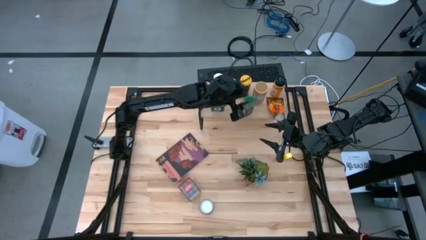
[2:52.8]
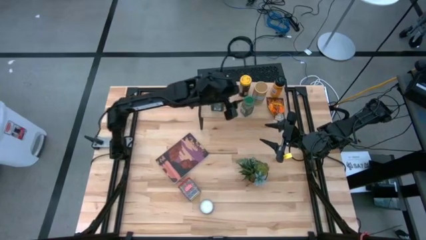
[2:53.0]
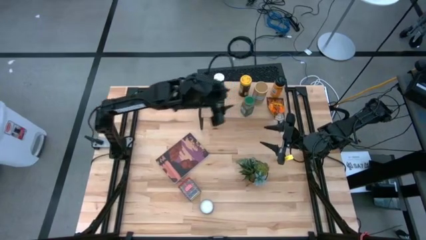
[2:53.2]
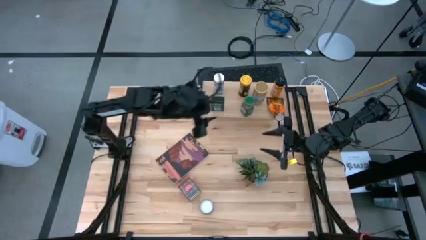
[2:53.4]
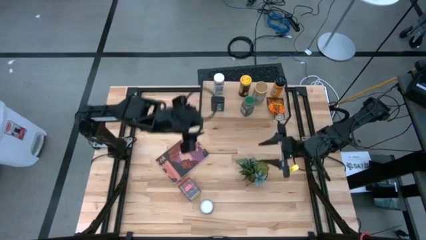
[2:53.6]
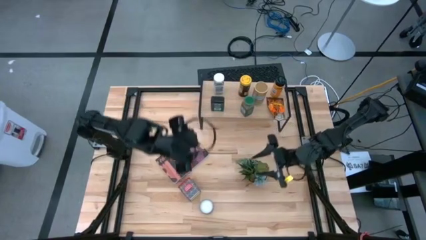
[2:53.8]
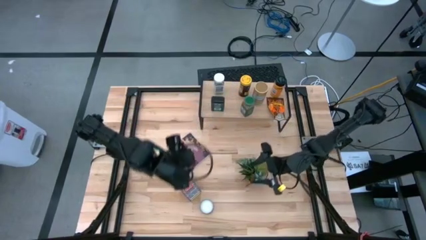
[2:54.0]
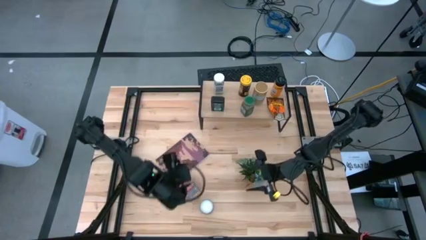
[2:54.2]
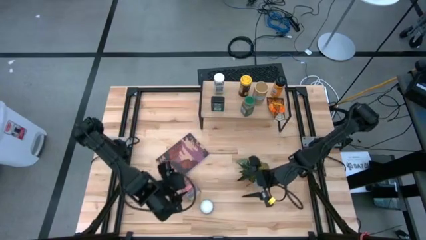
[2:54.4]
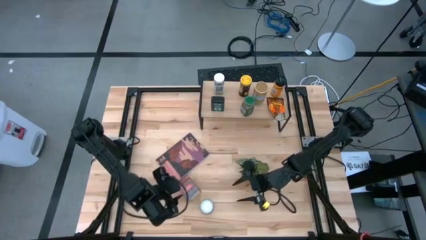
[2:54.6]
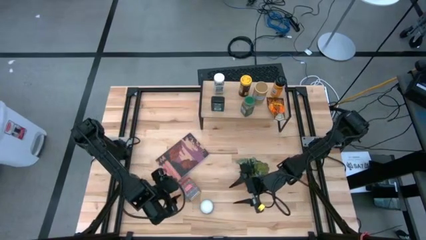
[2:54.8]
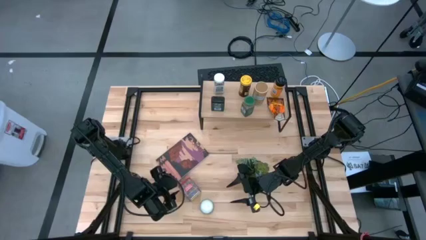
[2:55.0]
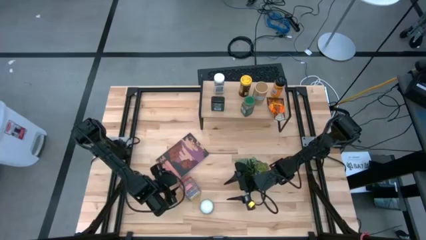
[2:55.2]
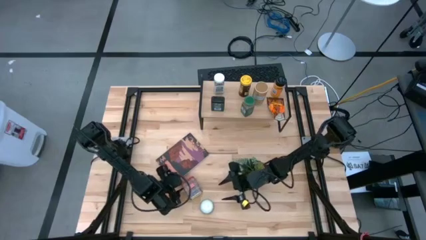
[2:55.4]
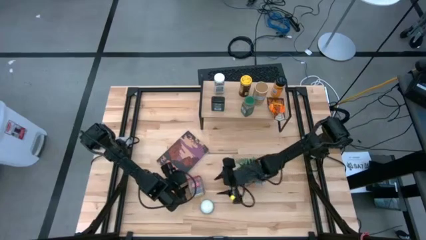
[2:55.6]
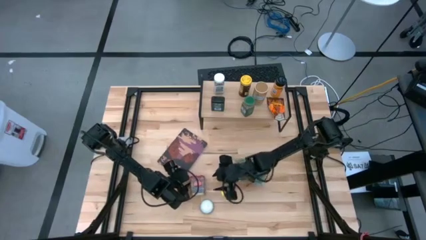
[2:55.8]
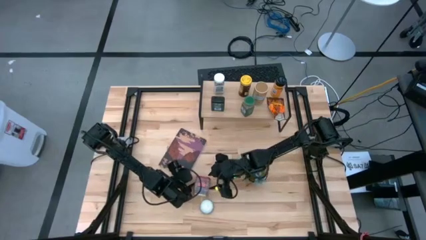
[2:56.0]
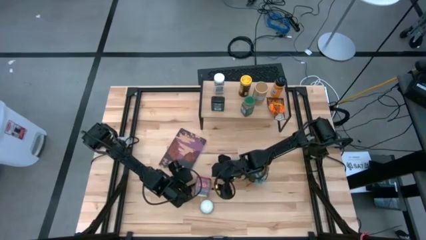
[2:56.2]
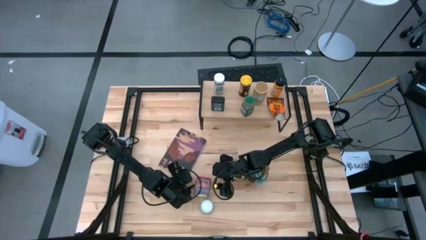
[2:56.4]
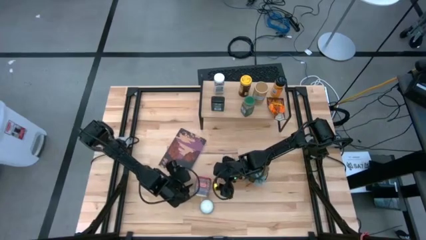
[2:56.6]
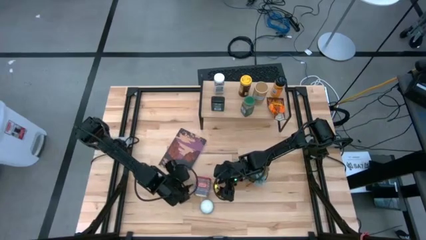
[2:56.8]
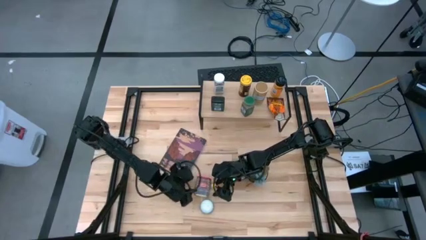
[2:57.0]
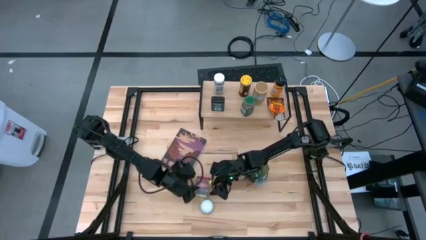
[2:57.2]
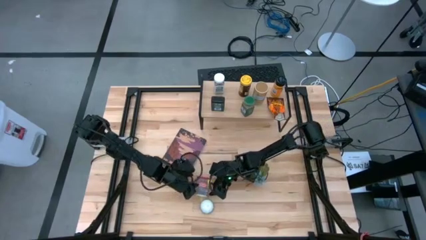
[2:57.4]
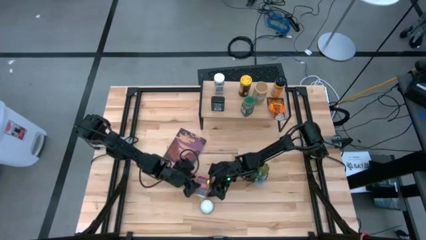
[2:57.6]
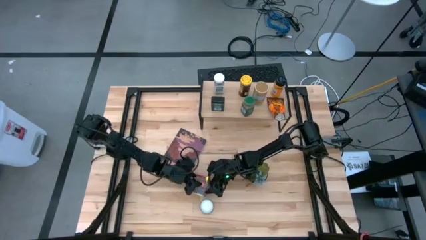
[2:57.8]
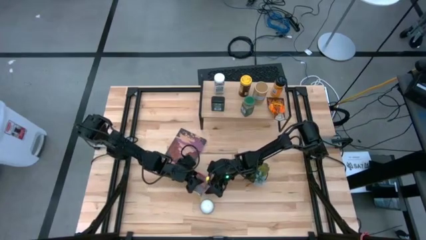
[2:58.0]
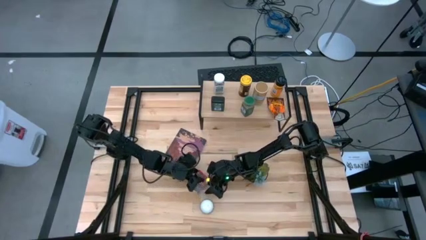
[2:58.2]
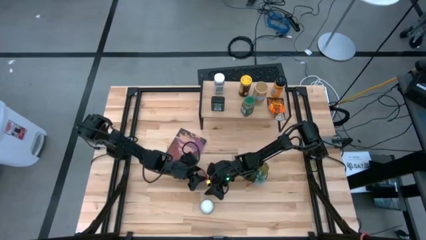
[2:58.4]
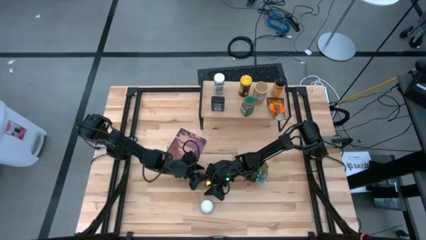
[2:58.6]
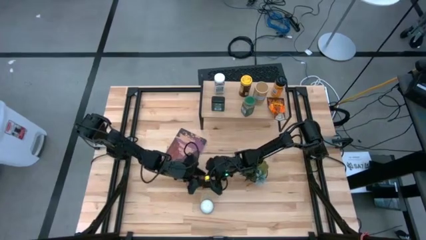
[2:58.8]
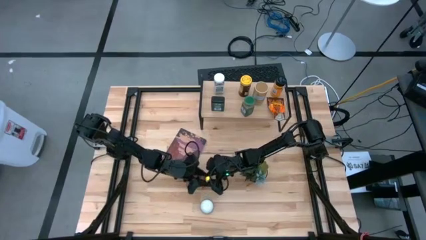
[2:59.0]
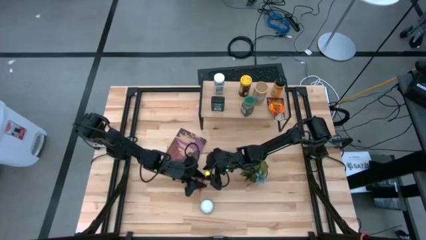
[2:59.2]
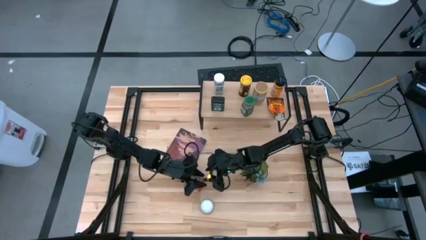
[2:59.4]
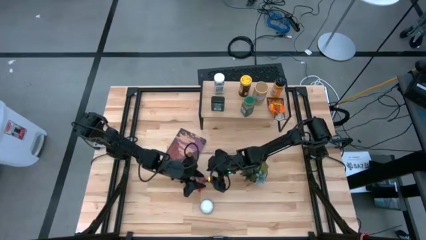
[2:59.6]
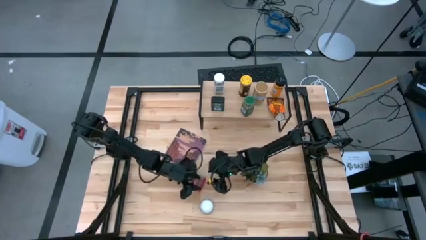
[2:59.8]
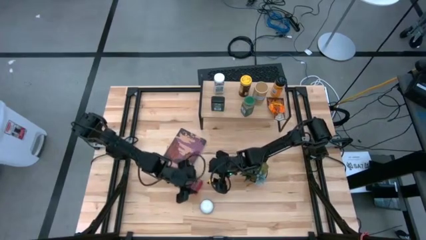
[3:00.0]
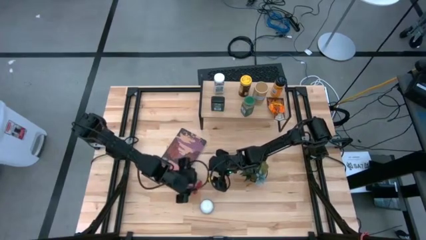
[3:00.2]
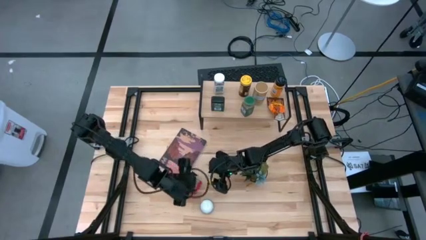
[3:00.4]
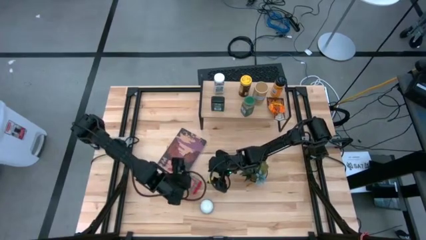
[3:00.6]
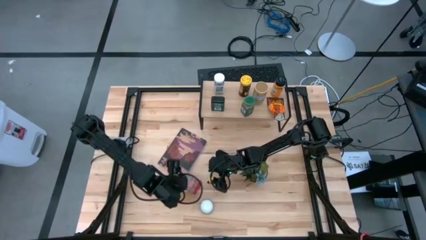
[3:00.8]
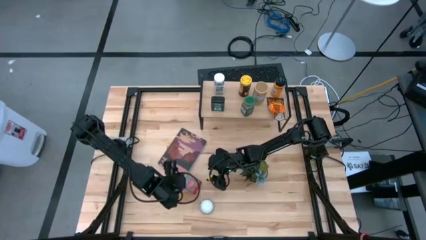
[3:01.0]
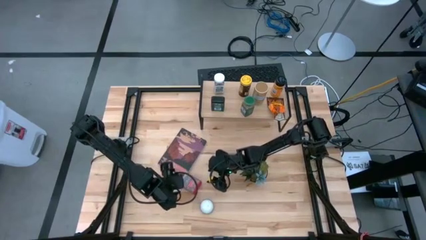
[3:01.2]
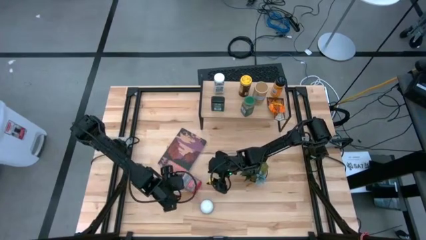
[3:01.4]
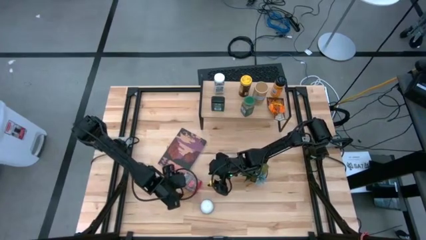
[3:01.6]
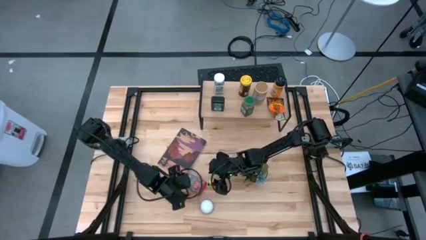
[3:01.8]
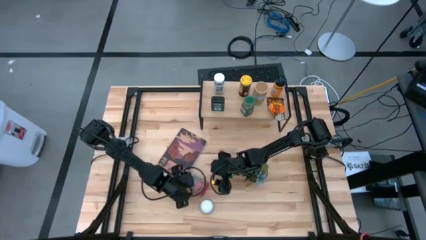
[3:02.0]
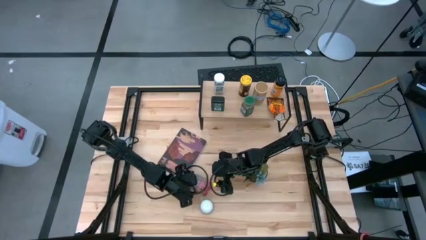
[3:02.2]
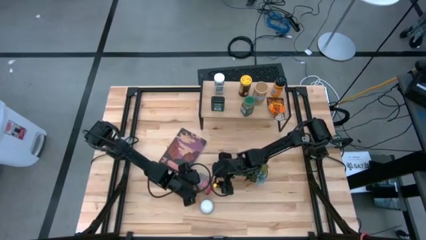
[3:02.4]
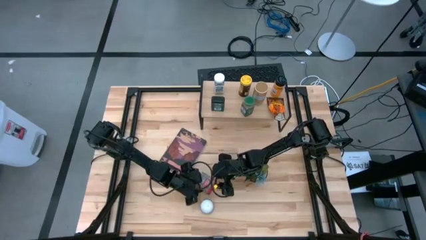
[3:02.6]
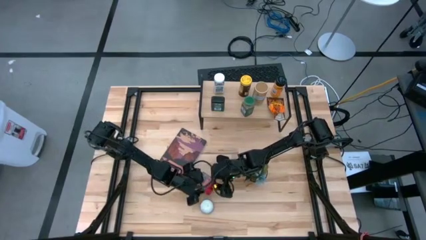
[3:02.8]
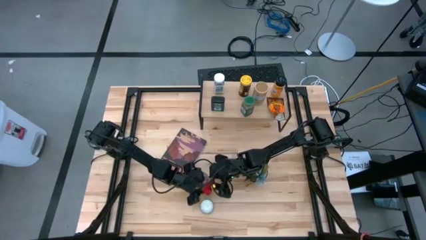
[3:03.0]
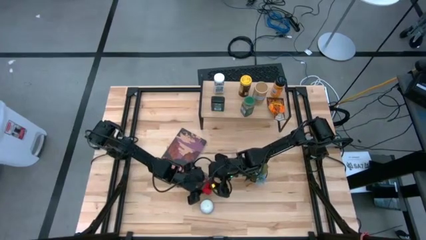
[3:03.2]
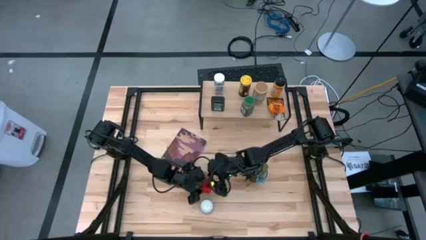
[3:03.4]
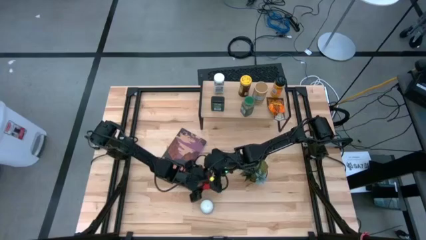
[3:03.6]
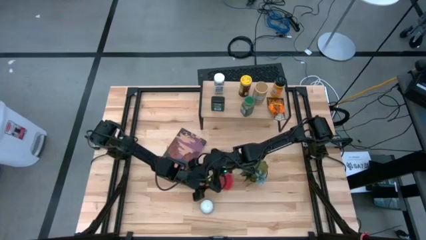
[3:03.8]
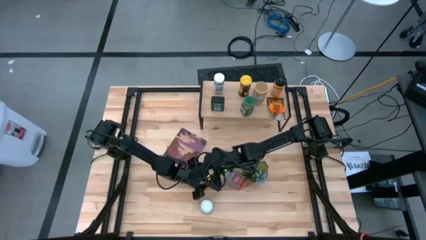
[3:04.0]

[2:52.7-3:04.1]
Task: Shelf spices
Put the red seasoning can on the shelf

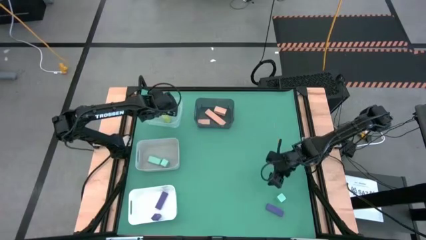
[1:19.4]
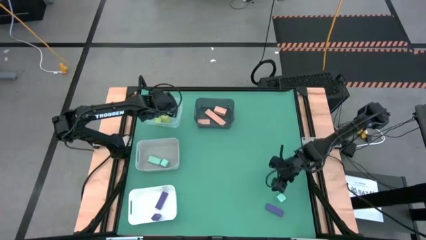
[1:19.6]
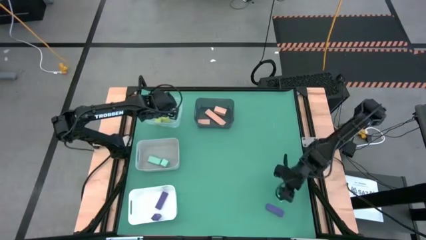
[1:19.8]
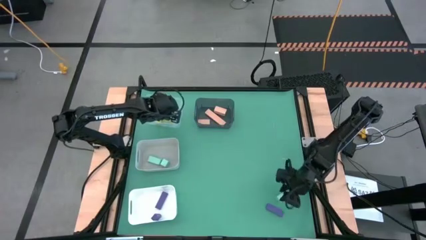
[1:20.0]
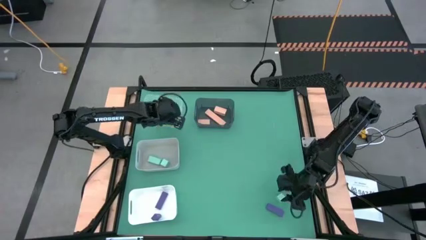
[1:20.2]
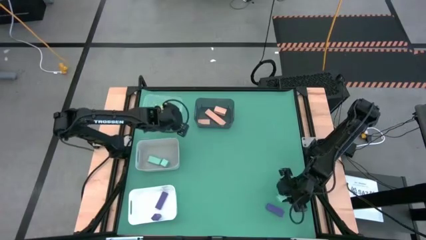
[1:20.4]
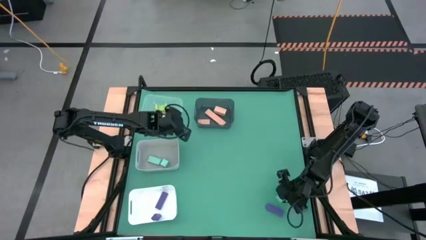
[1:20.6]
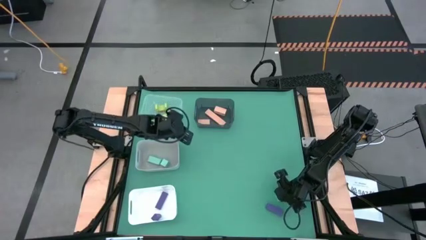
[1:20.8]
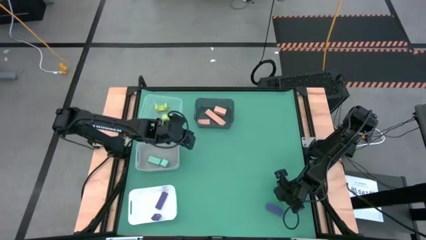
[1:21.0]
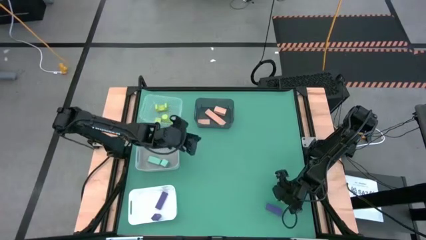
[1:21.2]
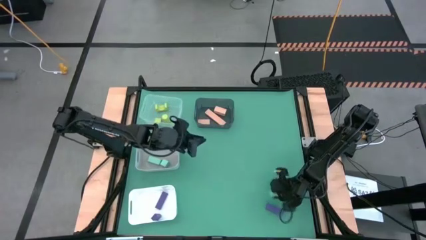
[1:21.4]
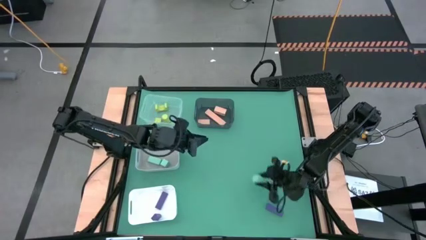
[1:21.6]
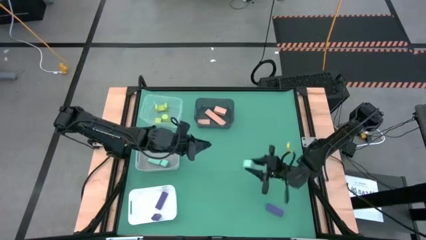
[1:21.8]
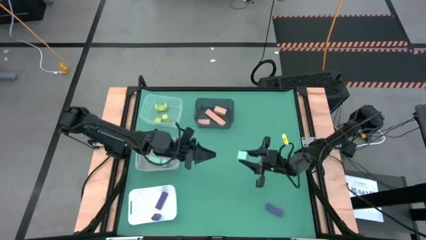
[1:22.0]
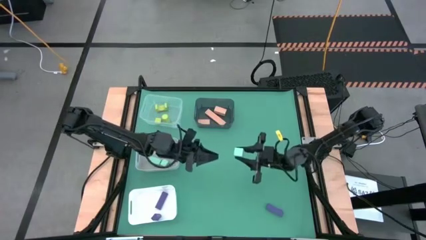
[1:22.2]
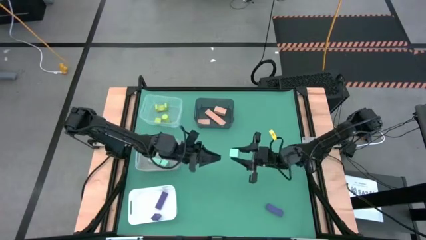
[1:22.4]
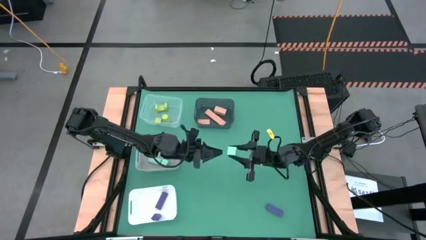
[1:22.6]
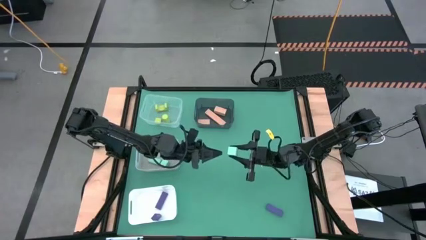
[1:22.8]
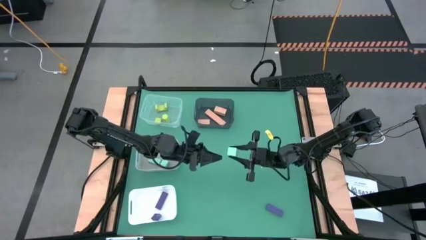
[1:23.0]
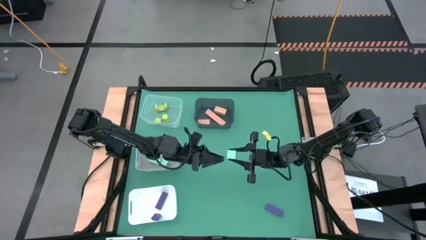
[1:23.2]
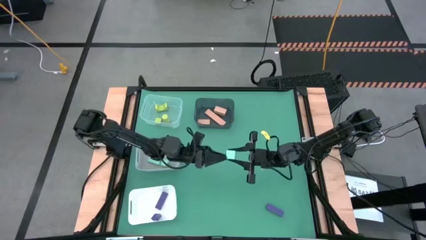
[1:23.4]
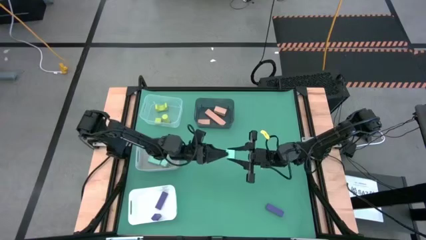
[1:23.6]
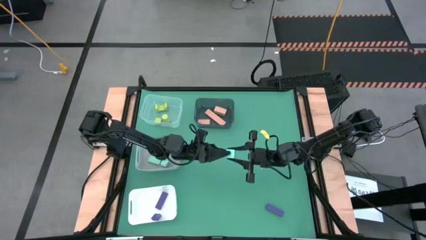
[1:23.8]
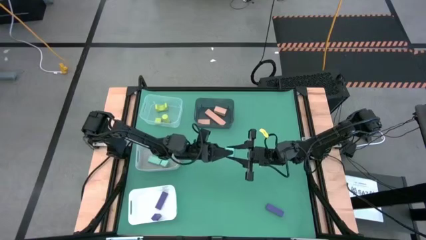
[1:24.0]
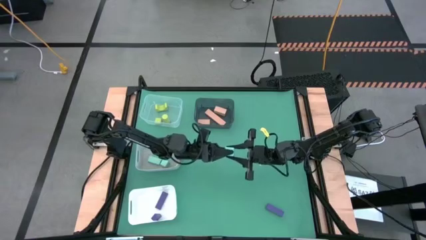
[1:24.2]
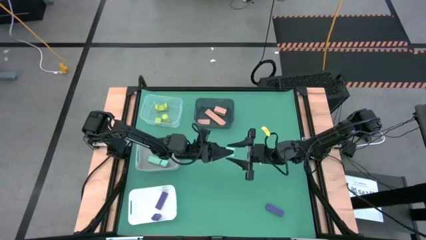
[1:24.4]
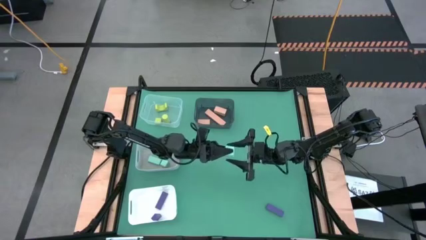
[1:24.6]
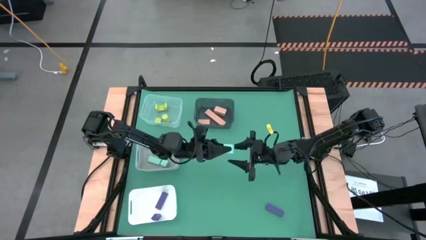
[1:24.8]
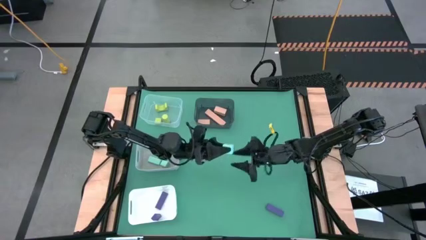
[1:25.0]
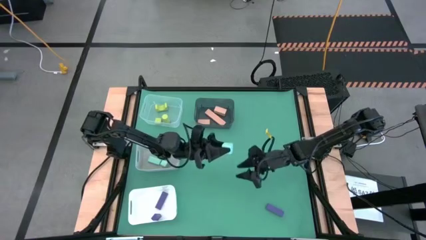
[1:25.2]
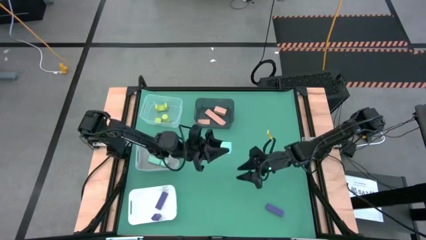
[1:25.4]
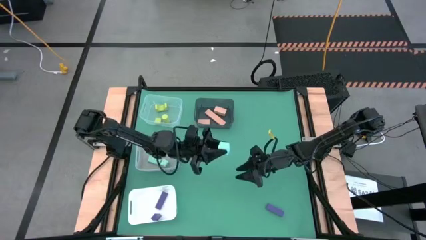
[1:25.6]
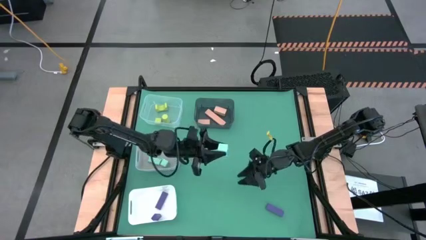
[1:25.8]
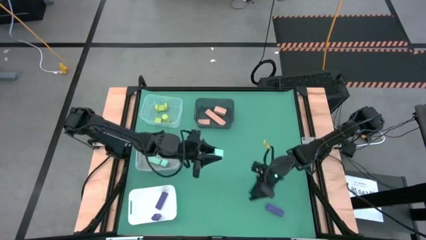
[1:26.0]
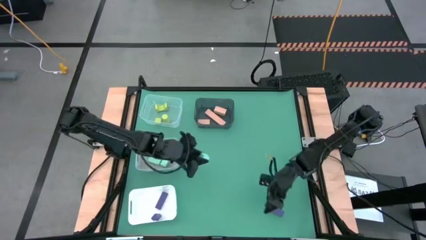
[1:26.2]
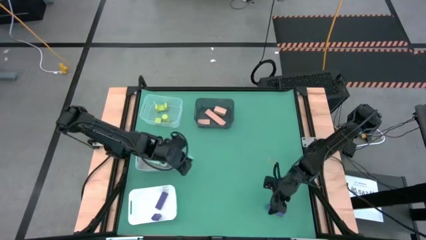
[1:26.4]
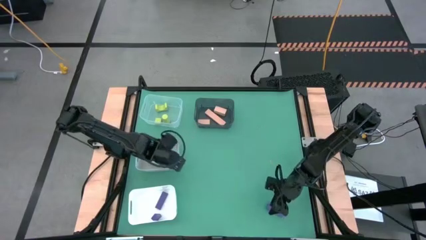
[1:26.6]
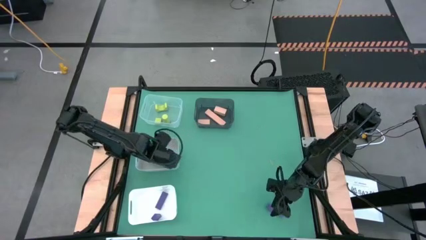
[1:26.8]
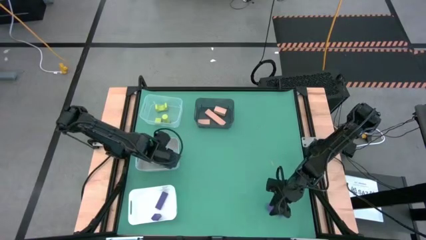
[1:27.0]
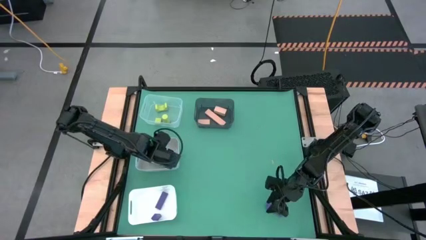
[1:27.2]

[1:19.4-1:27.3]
Task: Sort & place blocks by color
Put the blue block into the dark white bin
